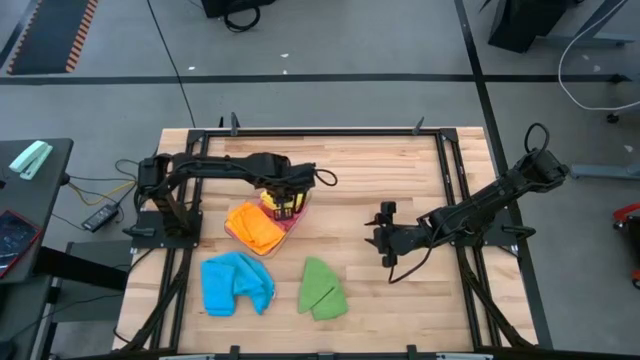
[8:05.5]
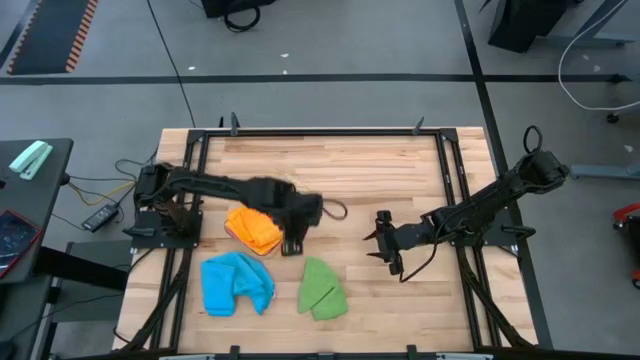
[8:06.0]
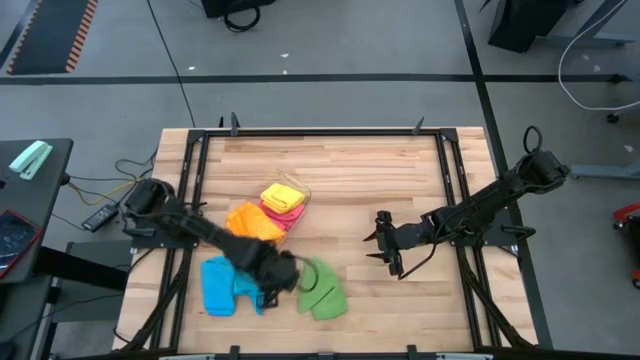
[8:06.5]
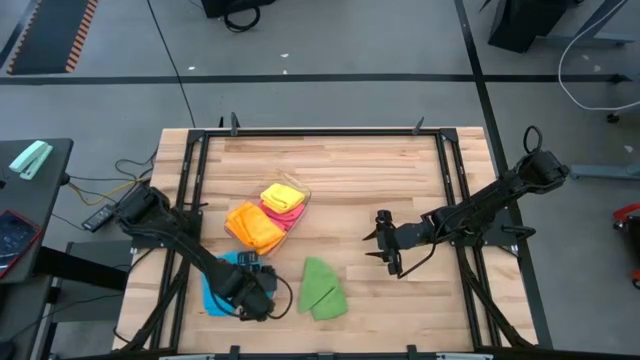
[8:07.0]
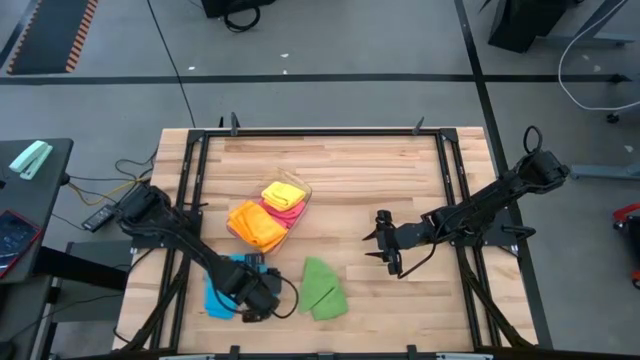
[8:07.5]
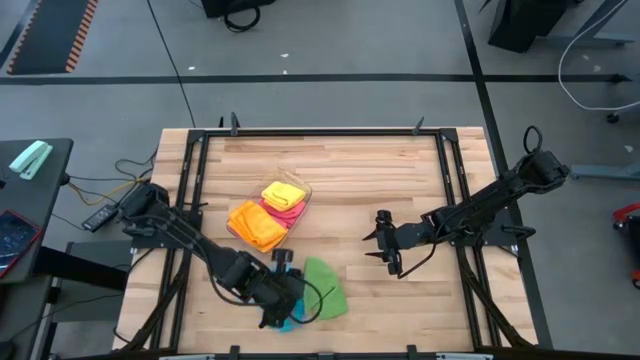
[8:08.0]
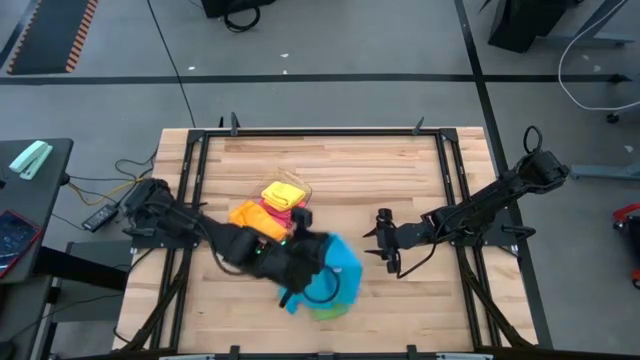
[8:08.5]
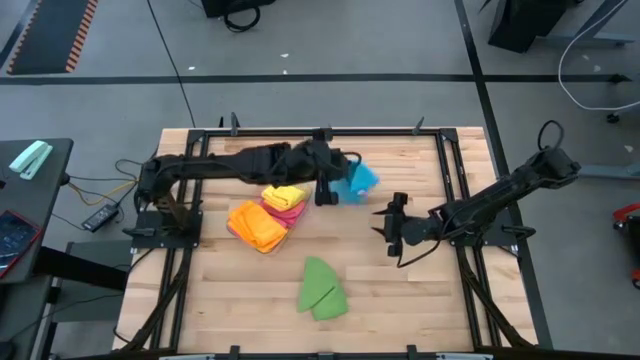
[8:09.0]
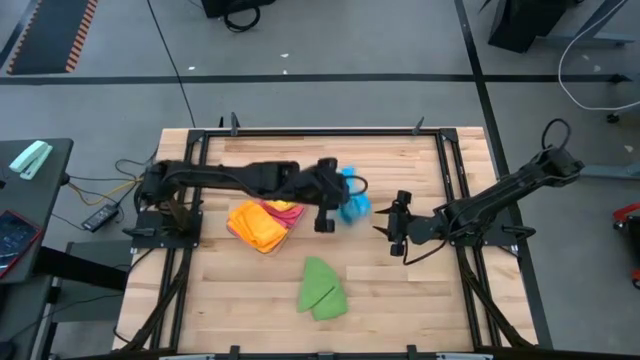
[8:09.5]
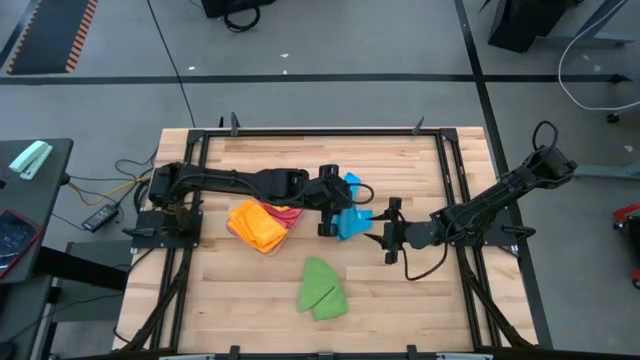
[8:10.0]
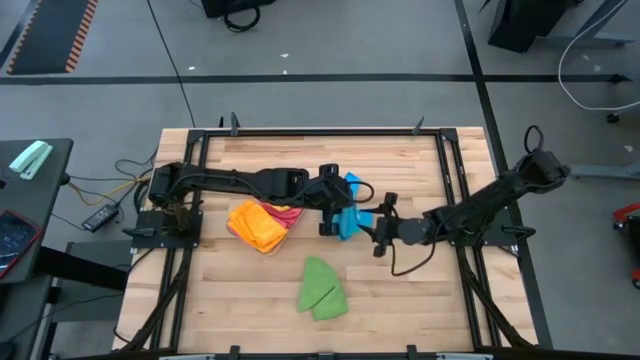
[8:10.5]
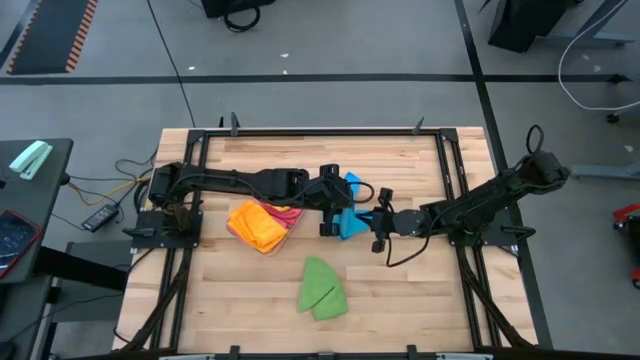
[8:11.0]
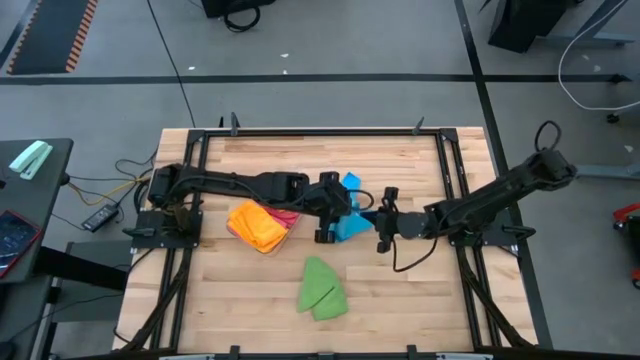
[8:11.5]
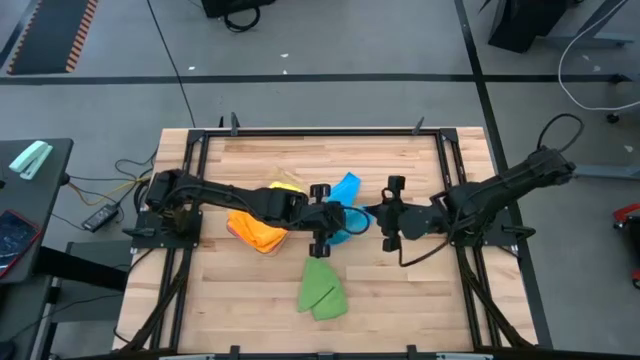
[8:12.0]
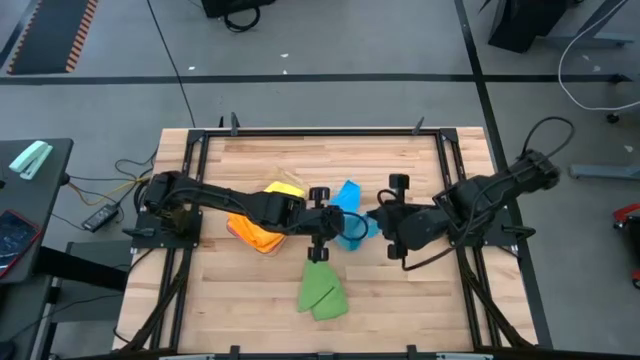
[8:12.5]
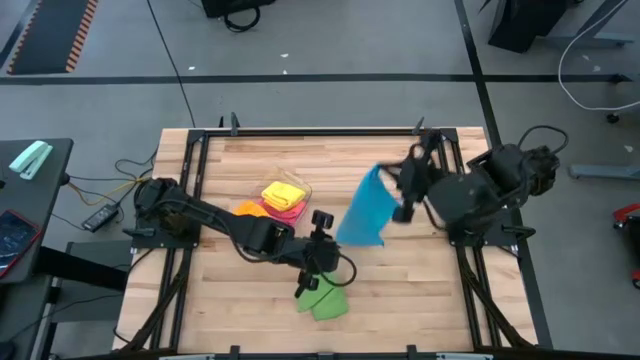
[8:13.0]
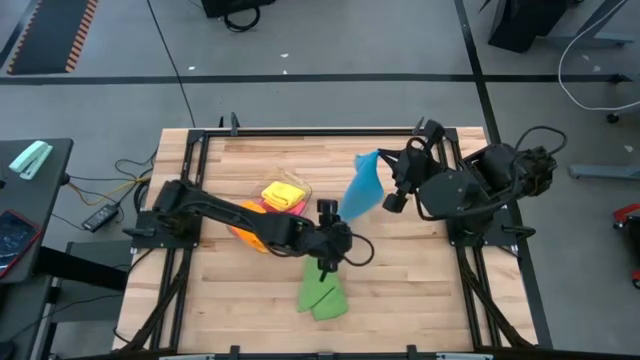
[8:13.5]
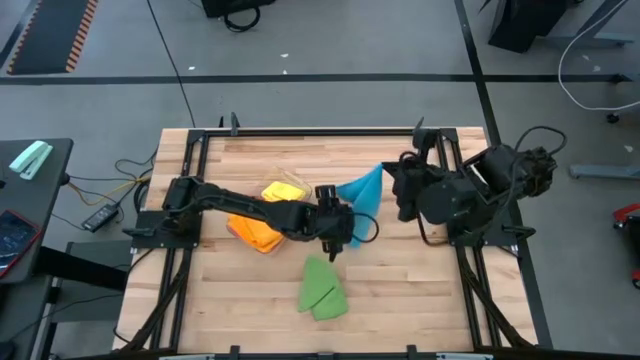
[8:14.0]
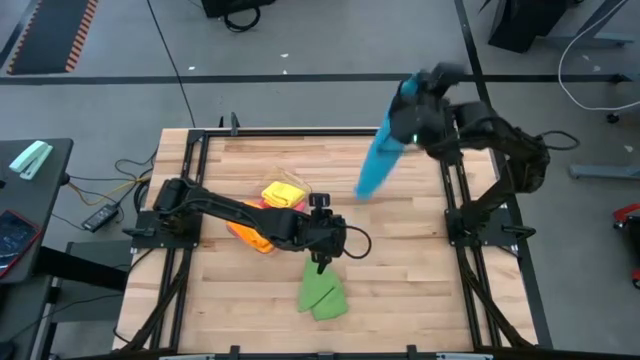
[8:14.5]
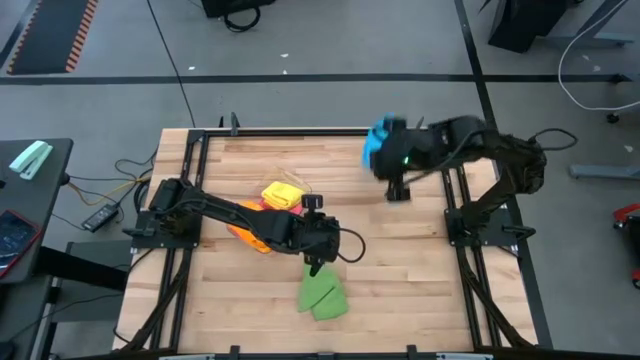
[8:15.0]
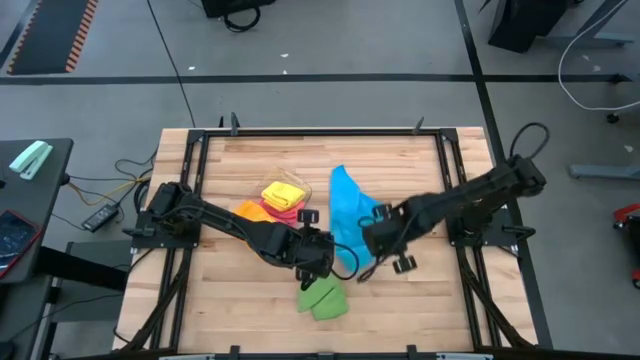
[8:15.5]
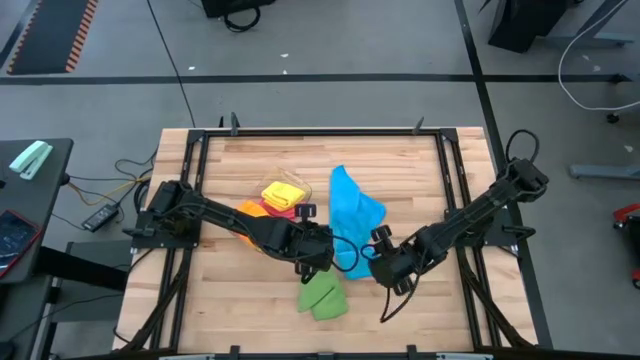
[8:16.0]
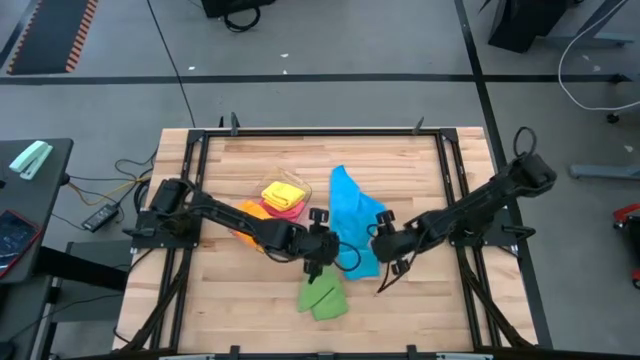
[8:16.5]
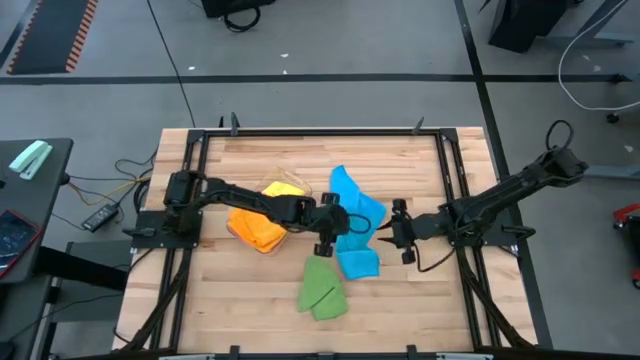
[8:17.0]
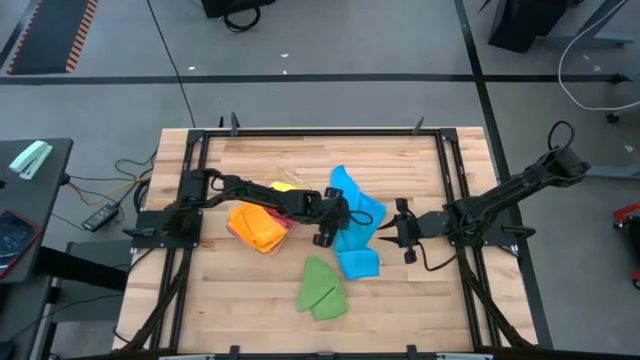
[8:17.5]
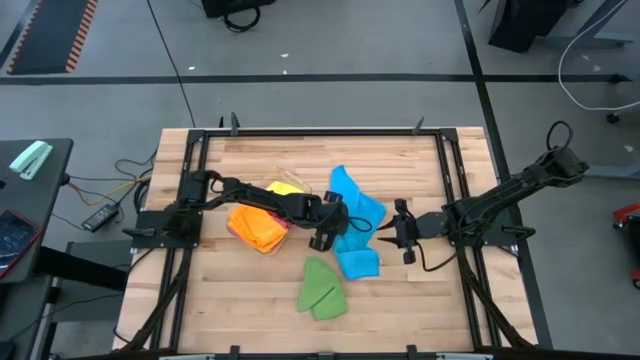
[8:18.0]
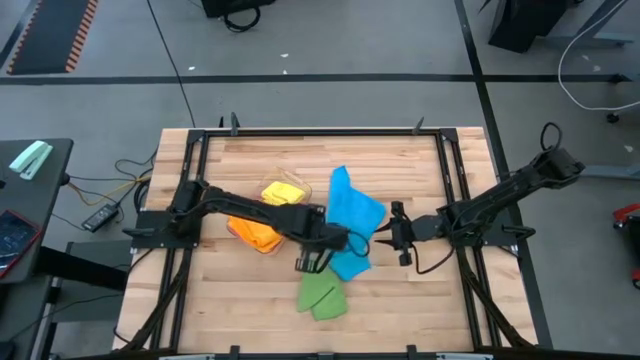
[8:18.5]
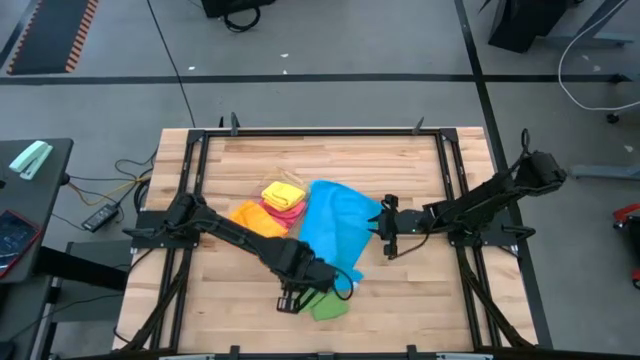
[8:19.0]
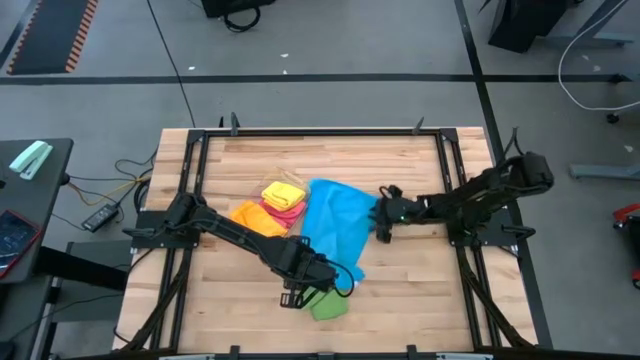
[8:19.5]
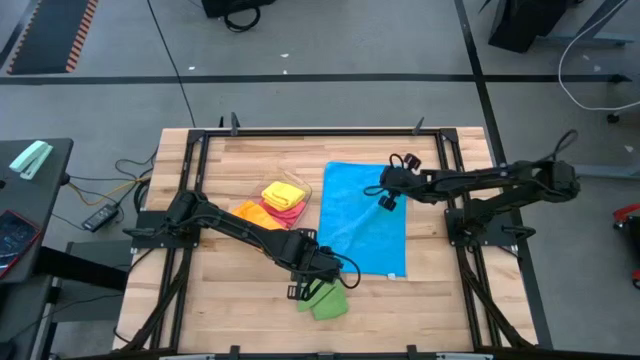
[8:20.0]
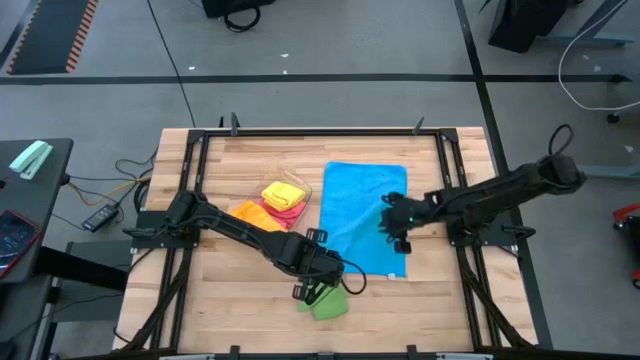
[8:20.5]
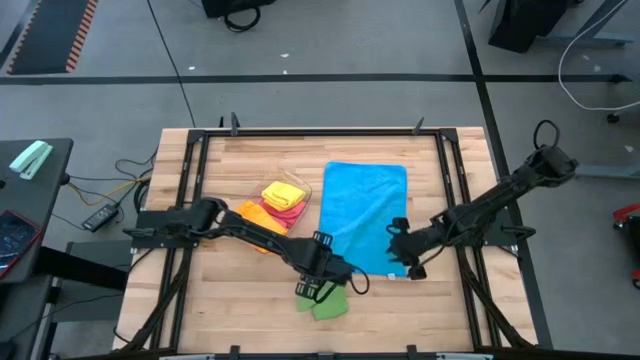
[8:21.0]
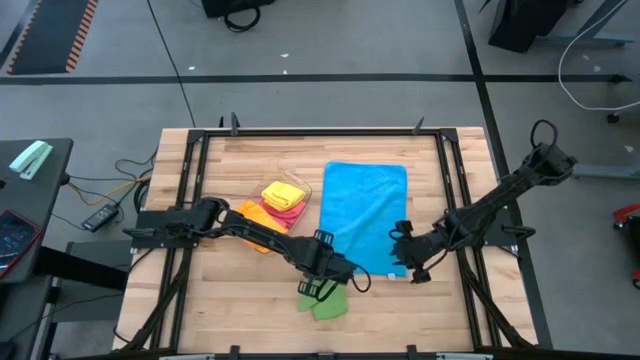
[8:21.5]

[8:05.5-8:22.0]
Task: Fold microfiber towels
Fold the blue microfiber towel
